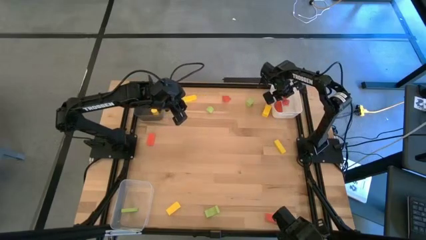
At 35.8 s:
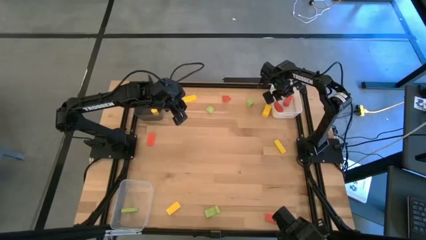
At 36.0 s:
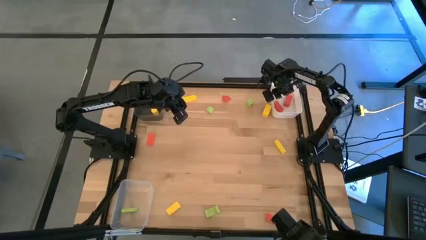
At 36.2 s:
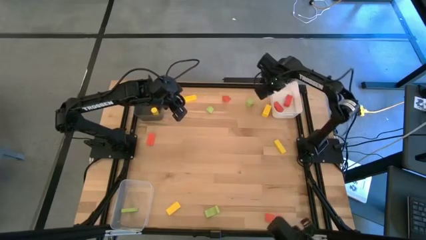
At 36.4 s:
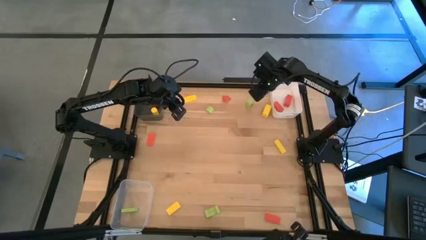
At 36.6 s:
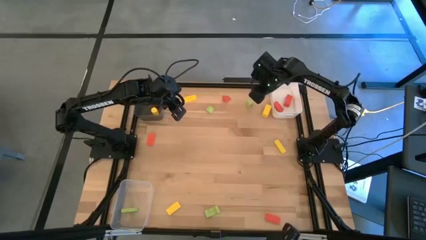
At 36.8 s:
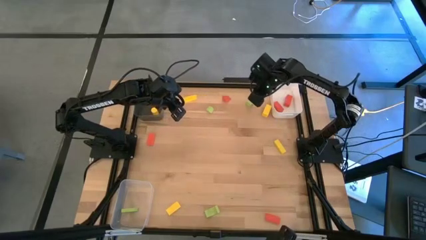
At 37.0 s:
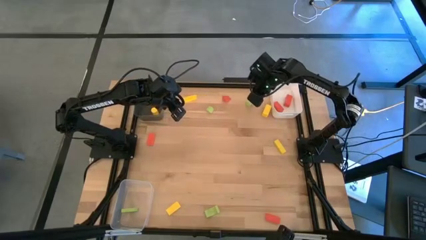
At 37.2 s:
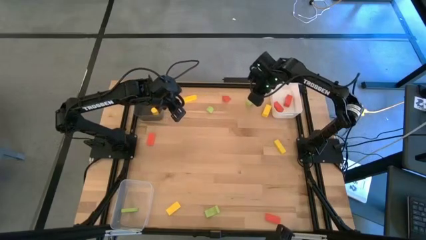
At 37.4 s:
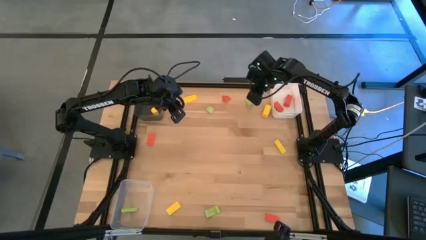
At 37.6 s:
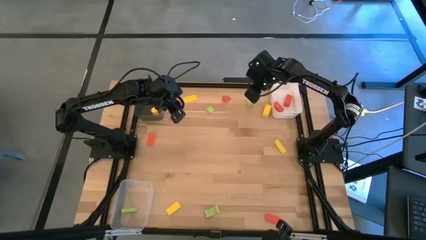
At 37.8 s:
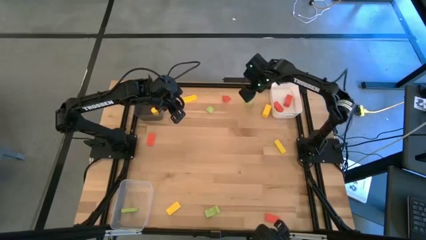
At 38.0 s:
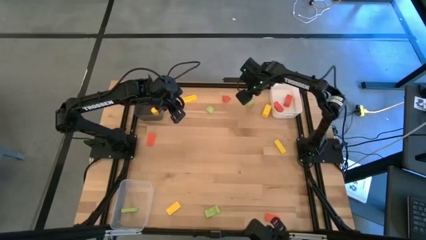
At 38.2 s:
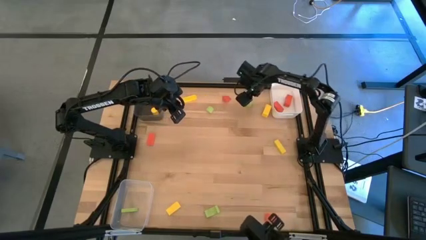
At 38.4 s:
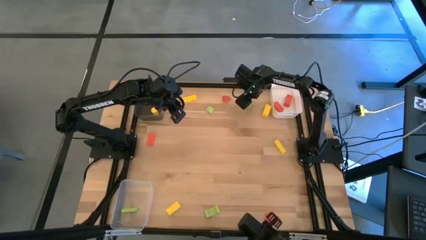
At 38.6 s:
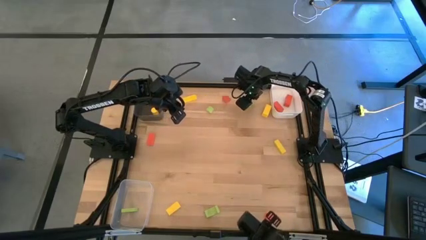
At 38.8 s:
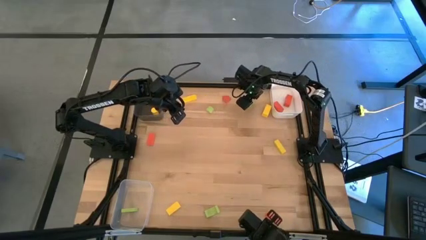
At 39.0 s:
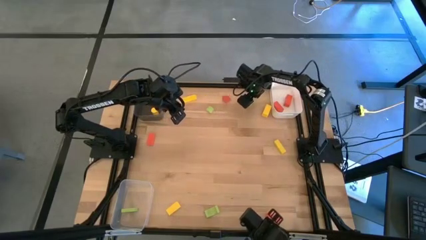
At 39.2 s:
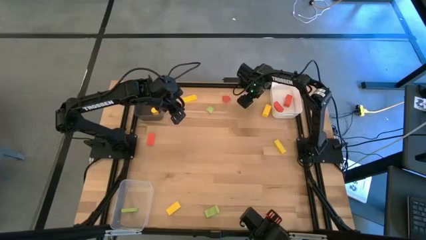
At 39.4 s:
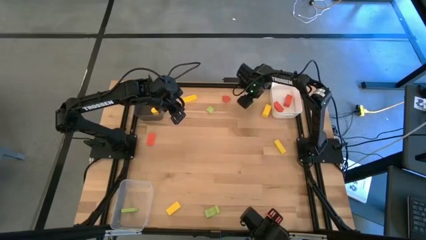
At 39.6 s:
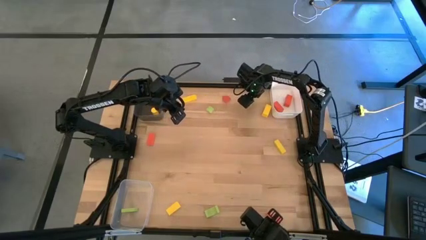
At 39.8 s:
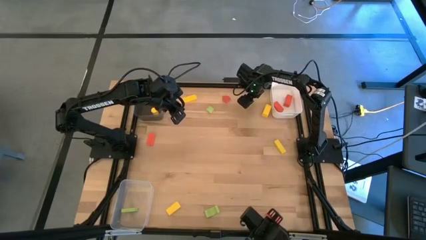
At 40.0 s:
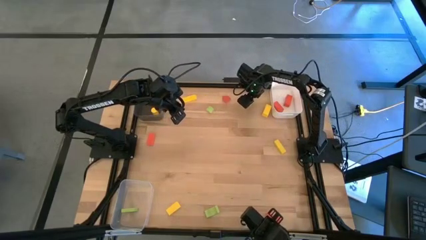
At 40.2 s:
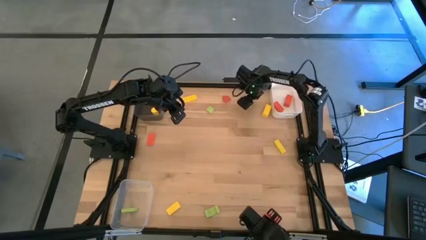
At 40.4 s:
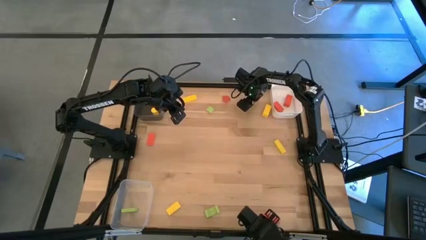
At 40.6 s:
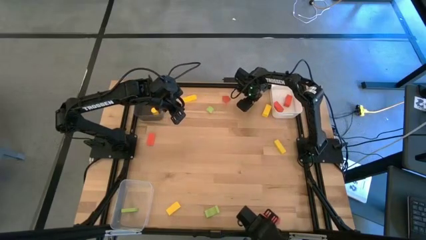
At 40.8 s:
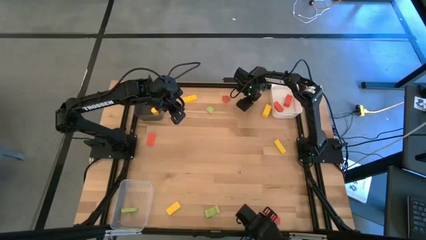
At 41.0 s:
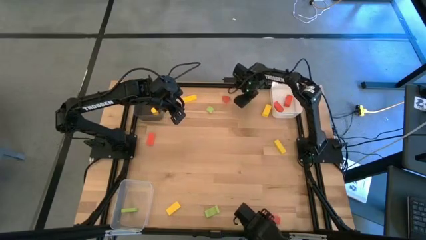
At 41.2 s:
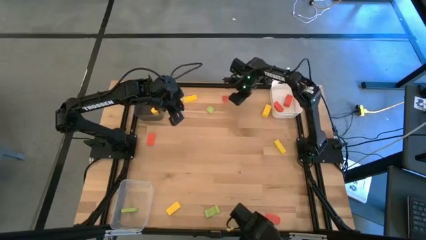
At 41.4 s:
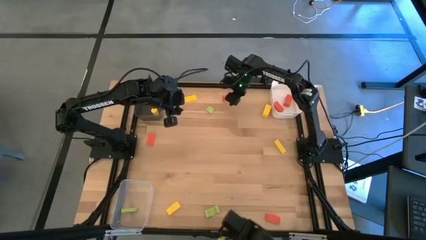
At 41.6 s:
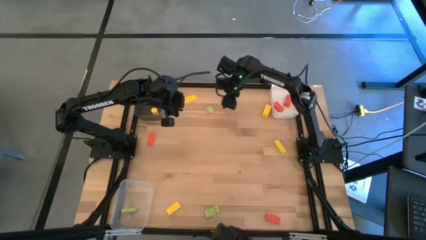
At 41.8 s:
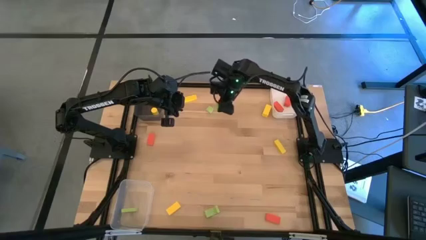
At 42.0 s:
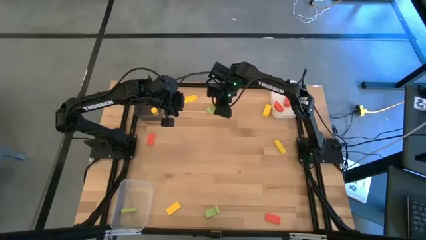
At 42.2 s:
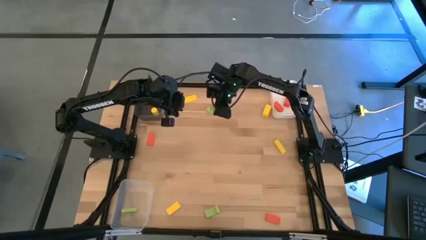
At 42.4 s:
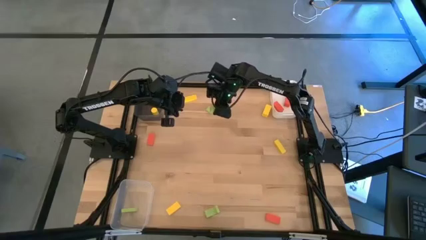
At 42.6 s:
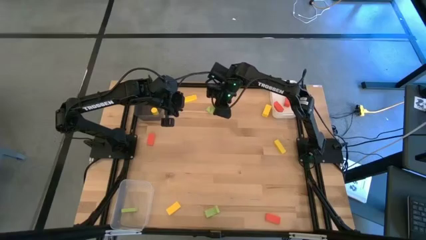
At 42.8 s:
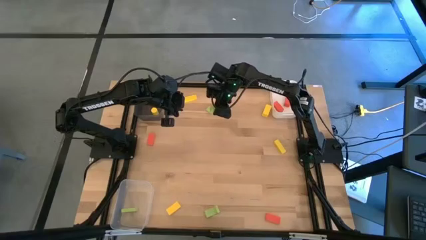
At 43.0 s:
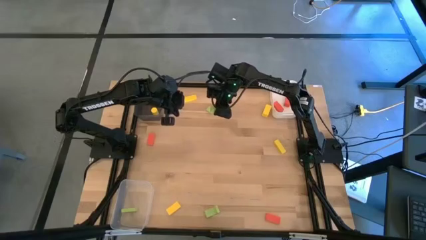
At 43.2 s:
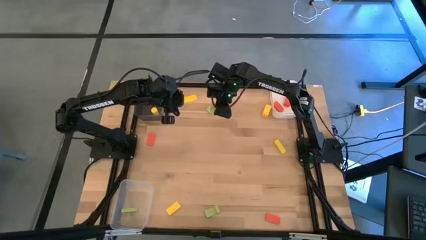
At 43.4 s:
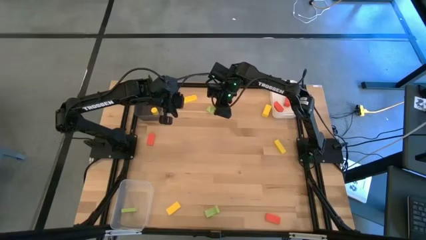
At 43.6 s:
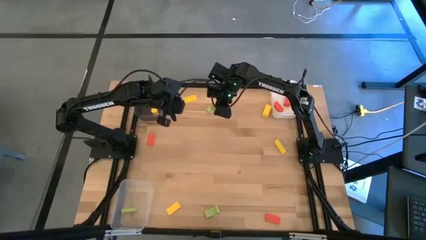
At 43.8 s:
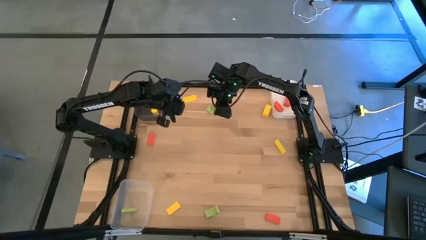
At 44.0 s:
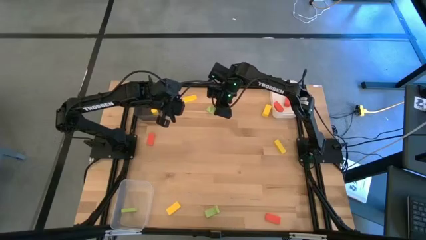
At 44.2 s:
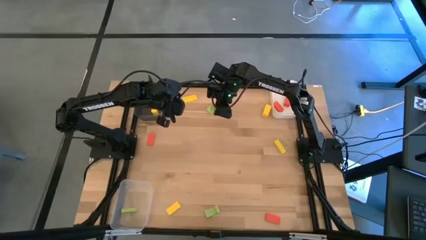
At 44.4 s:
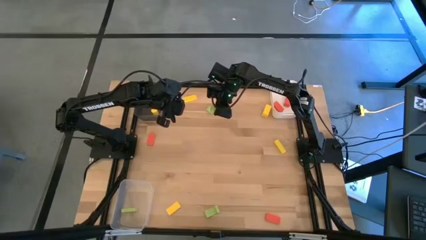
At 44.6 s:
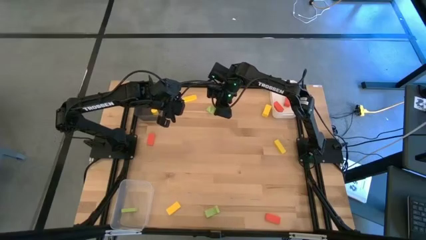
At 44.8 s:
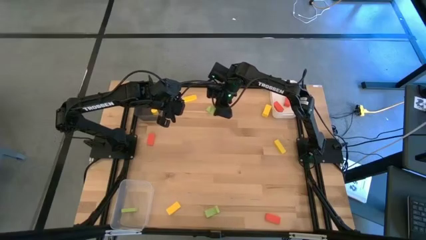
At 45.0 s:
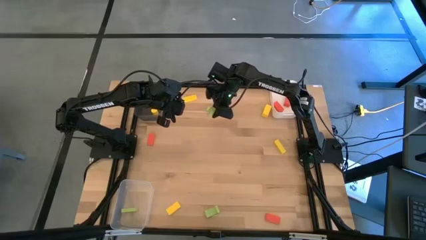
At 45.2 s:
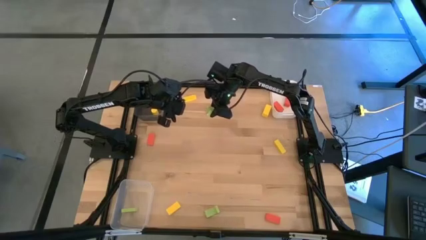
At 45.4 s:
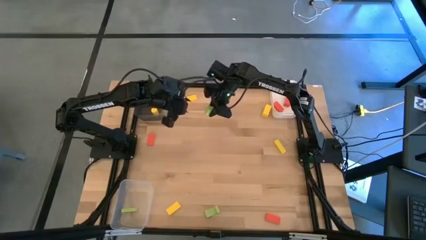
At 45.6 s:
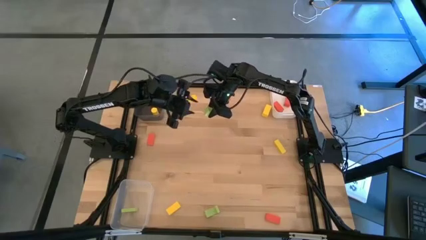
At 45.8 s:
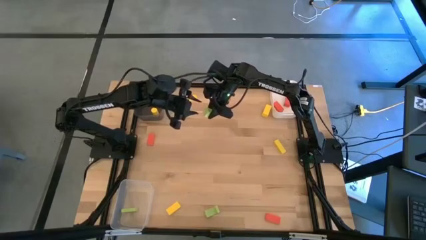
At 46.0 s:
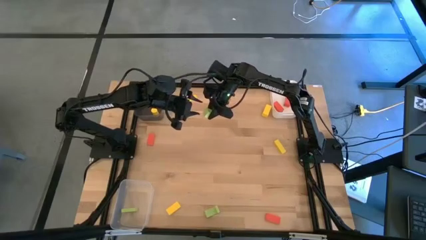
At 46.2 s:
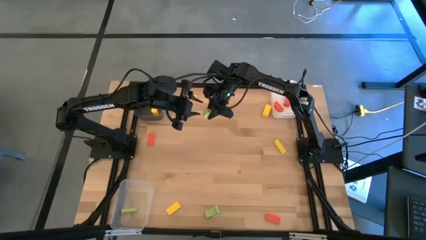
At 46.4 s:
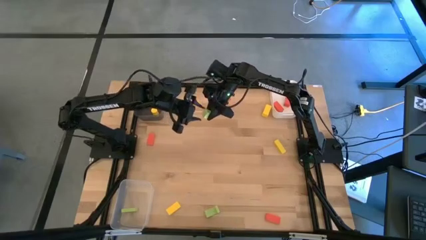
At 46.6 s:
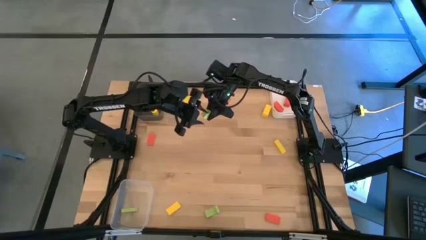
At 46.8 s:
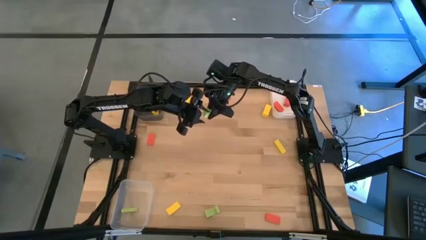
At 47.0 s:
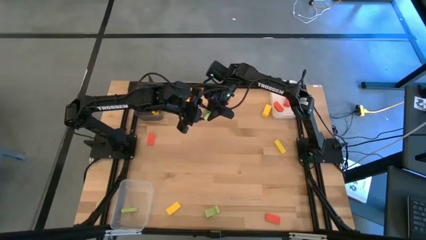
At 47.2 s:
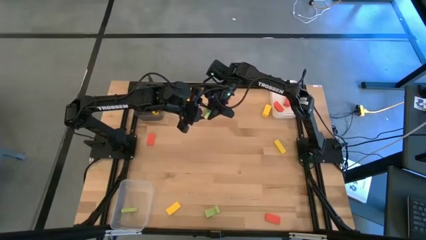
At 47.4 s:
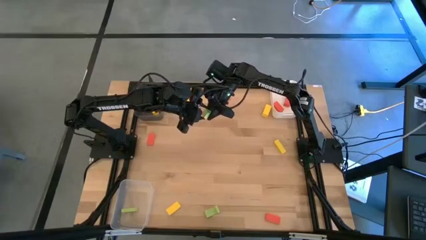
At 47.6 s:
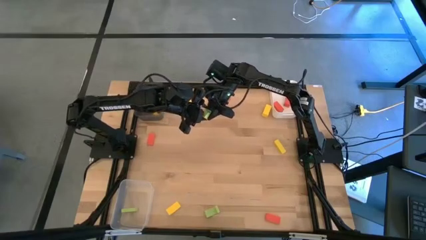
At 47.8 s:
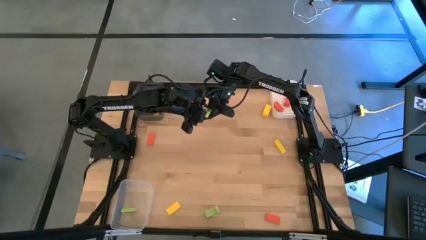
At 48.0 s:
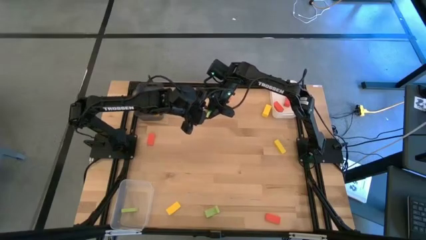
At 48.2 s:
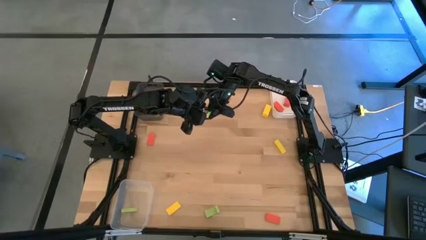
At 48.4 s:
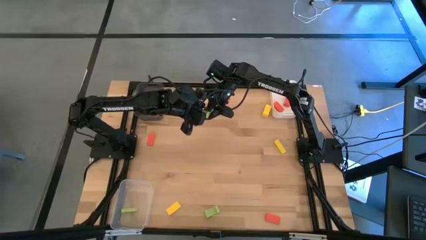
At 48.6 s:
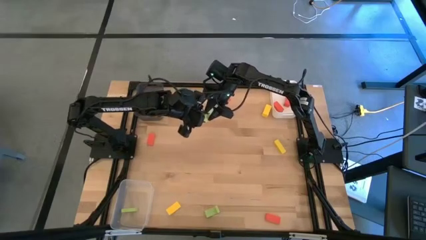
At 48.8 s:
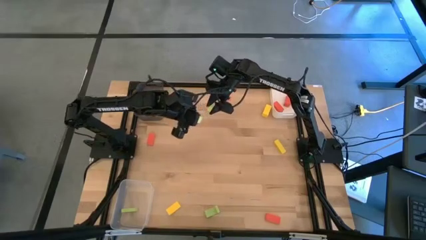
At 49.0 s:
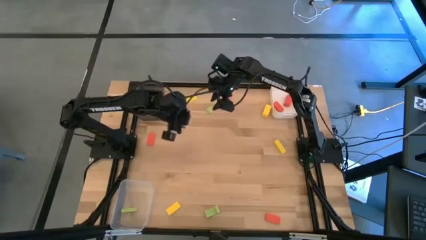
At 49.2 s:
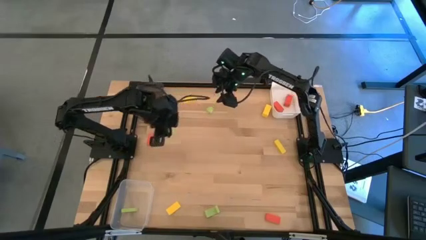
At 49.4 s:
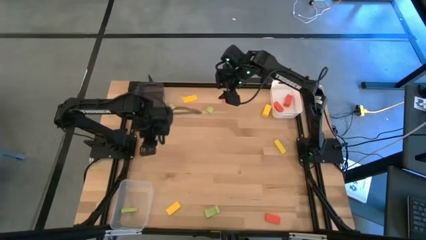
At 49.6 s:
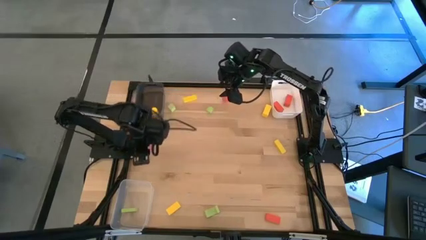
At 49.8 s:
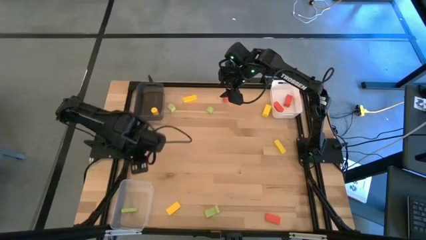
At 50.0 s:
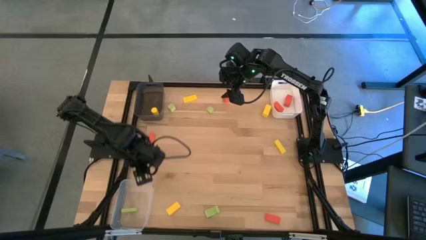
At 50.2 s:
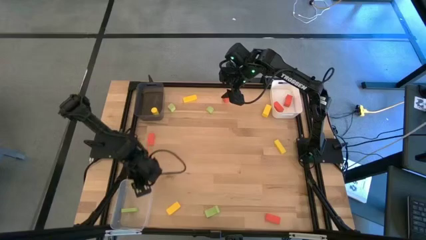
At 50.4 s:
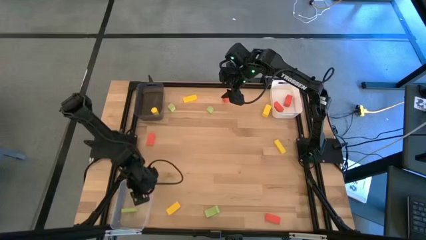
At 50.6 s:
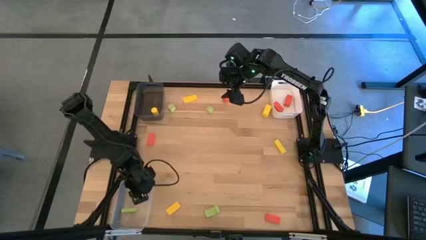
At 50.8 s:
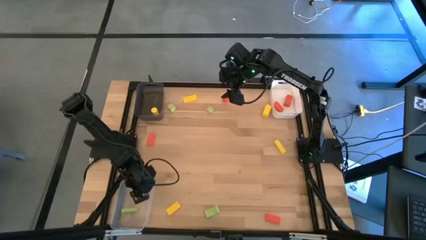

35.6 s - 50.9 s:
Task: Sort & place blocks by color
Put the green block into the transparent bin

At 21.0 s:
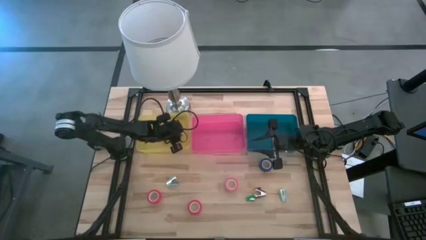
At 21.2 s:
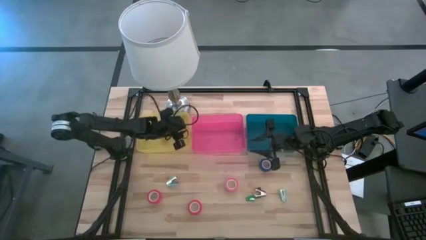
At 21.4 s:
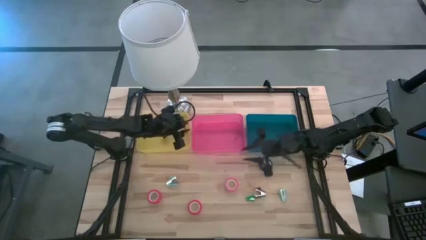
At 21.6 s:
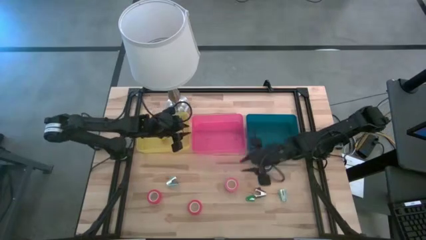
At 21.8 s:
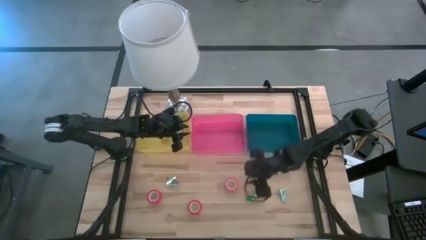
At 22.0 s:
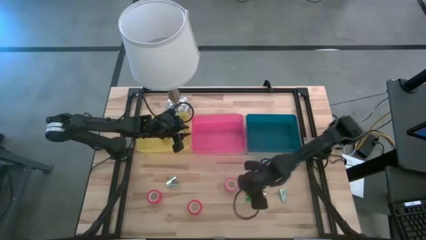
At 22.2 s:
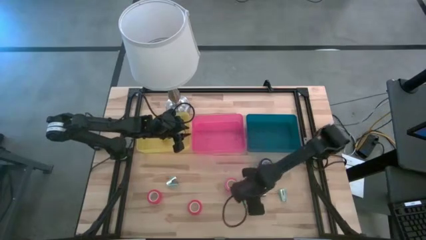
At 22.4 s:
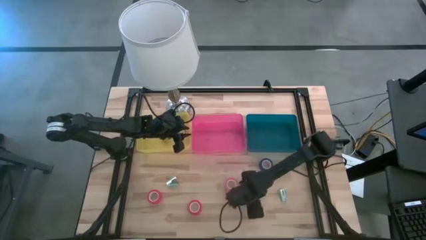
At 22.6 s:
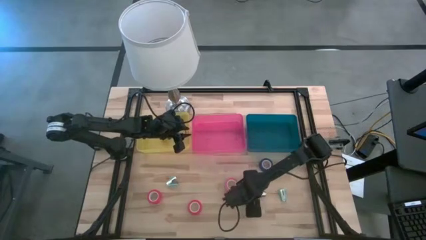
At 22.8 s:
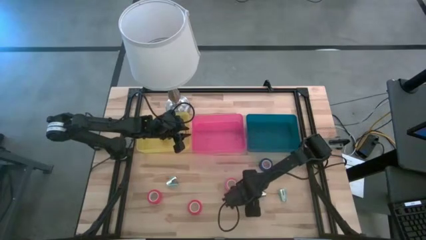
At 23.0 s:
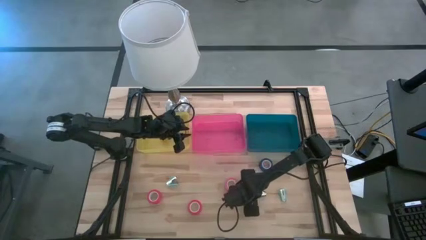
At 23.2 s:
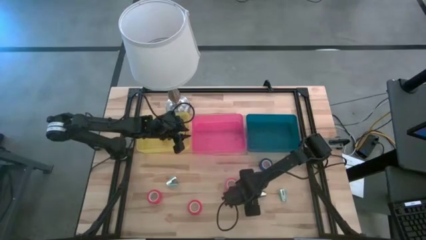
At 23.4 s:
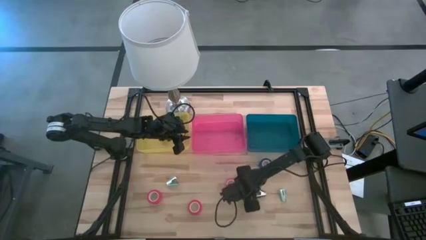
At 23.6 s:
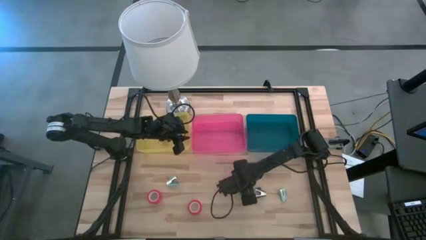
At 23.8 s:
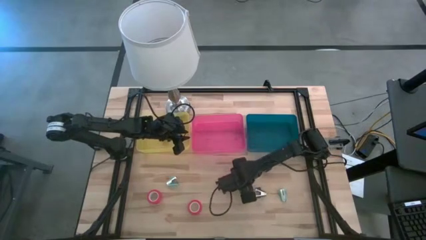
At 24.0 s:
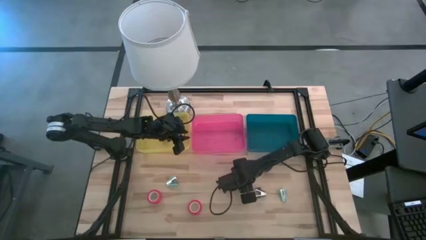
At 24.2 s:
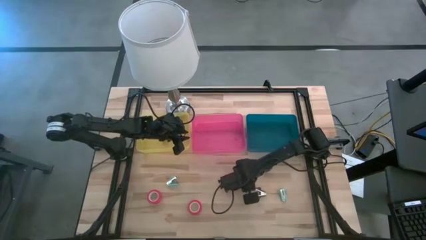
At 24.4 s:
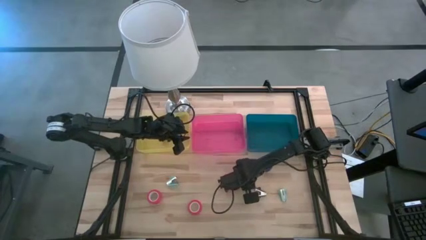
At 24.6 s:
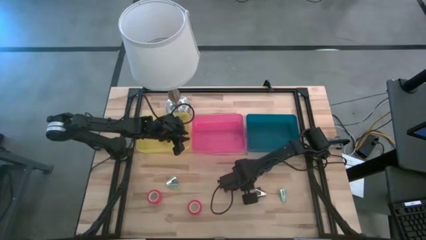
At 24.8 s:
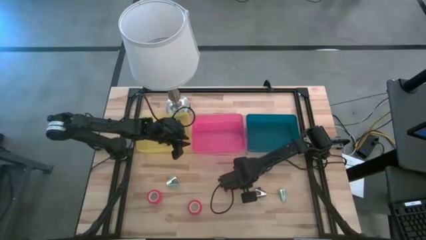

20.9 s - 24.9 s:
Task: Pick and place Stapler, Stapler remover, tape
Put the green stapler into the yellow bin
